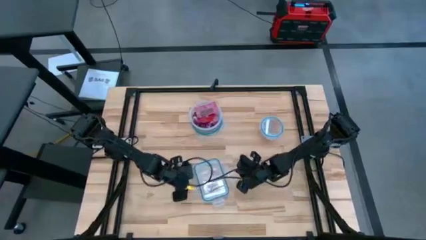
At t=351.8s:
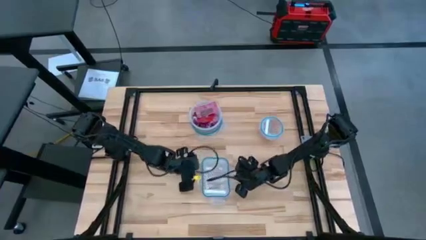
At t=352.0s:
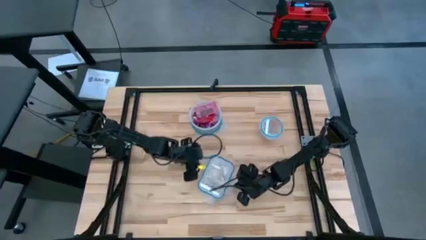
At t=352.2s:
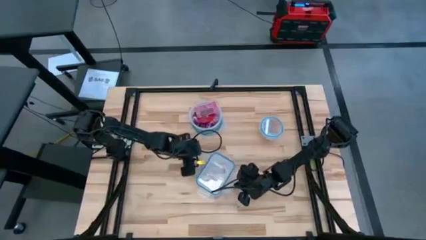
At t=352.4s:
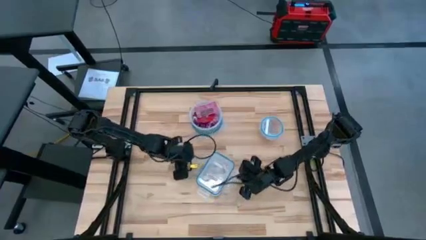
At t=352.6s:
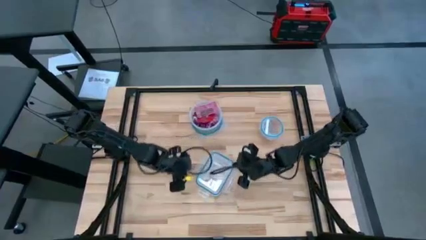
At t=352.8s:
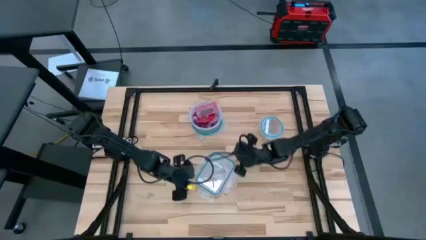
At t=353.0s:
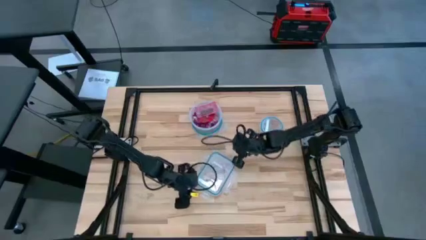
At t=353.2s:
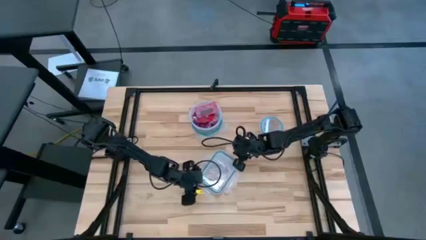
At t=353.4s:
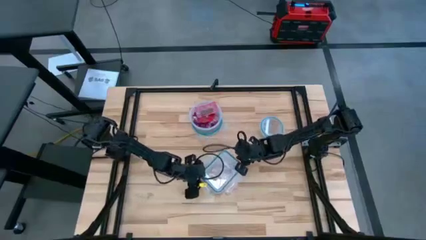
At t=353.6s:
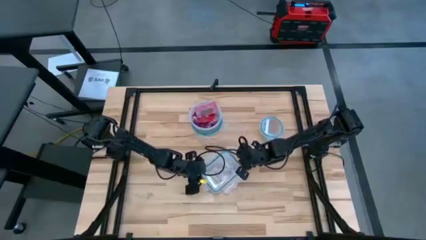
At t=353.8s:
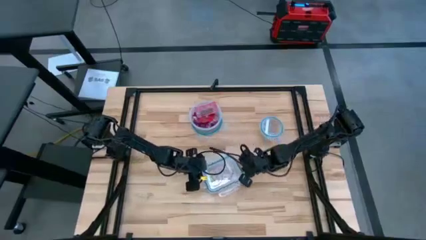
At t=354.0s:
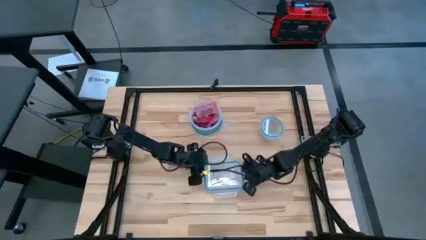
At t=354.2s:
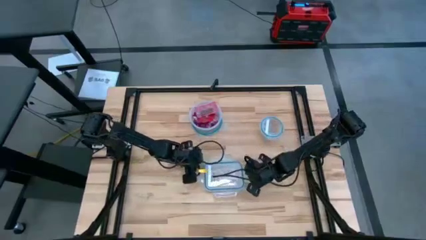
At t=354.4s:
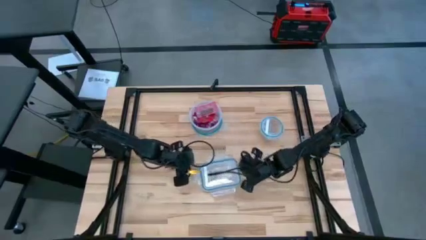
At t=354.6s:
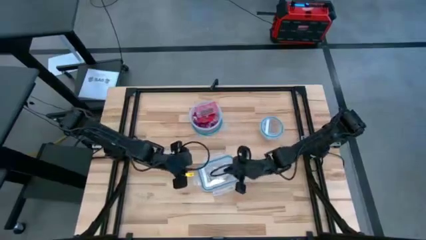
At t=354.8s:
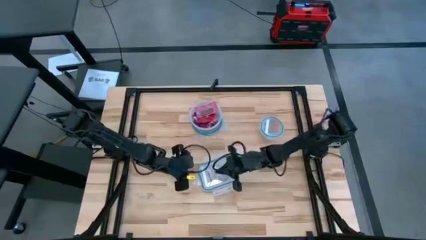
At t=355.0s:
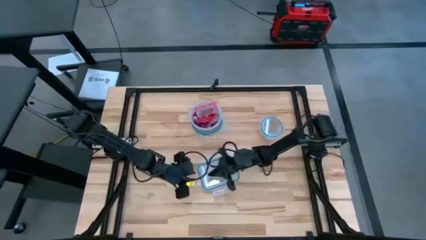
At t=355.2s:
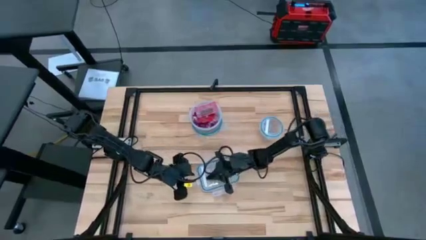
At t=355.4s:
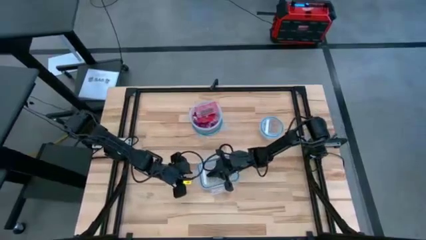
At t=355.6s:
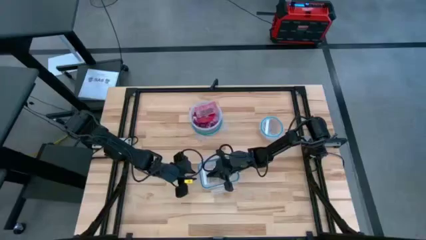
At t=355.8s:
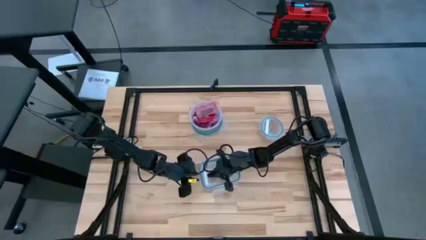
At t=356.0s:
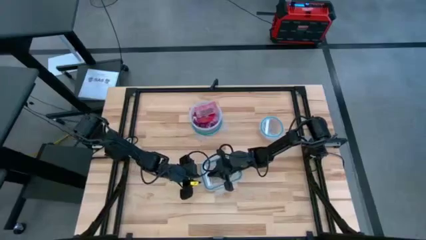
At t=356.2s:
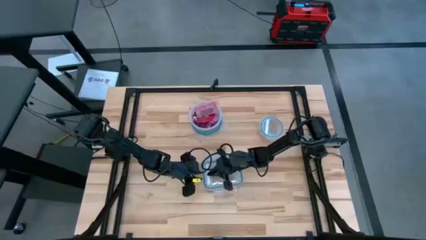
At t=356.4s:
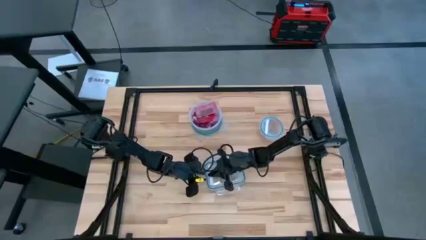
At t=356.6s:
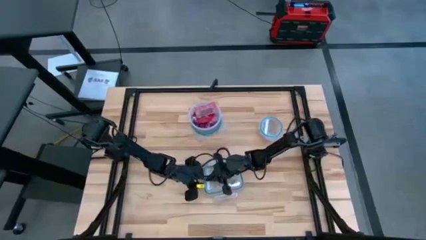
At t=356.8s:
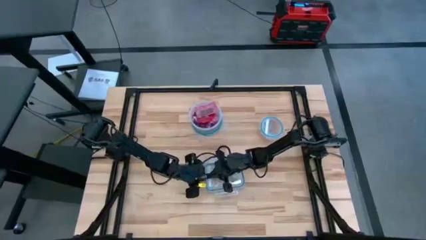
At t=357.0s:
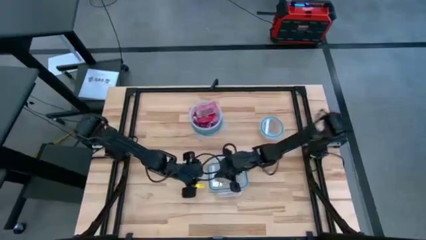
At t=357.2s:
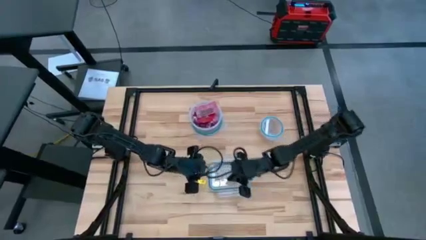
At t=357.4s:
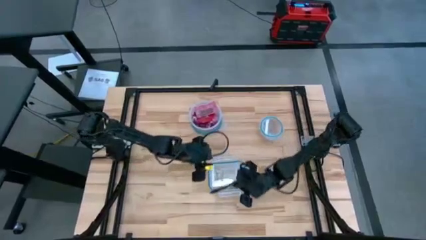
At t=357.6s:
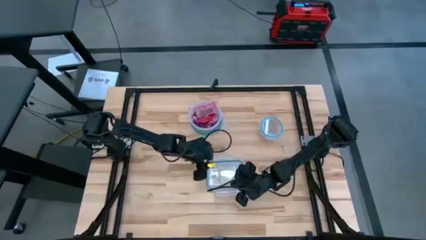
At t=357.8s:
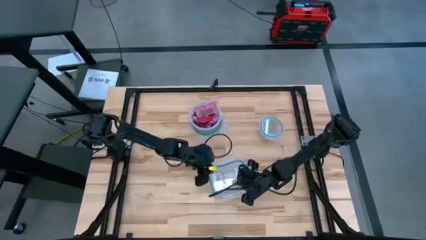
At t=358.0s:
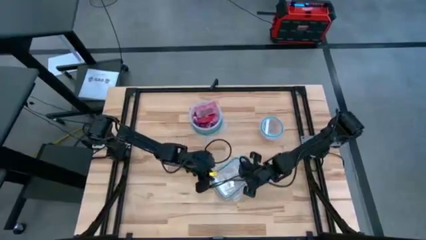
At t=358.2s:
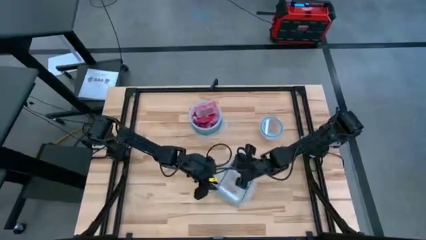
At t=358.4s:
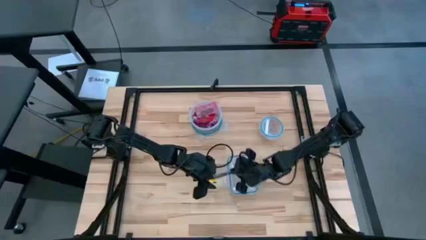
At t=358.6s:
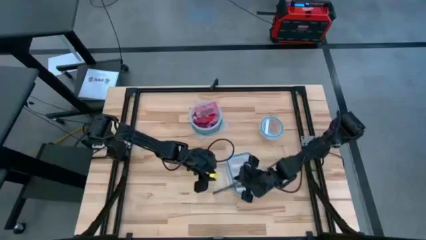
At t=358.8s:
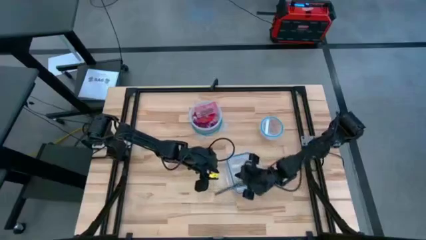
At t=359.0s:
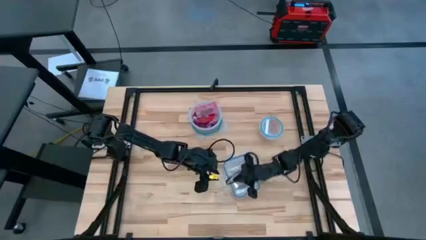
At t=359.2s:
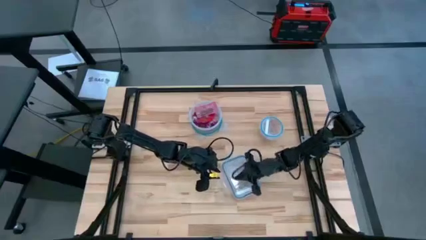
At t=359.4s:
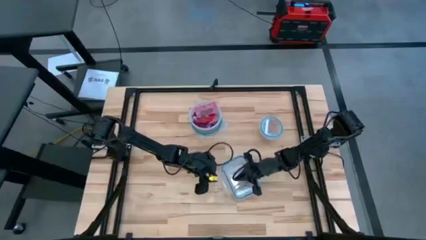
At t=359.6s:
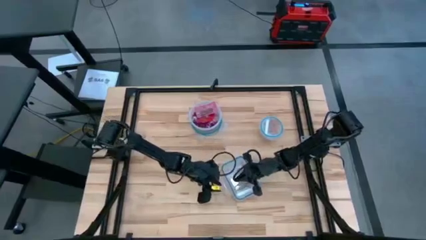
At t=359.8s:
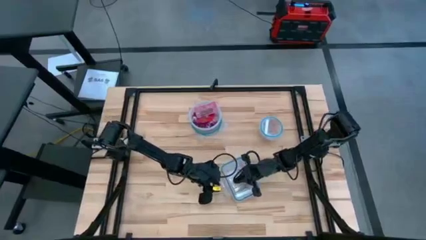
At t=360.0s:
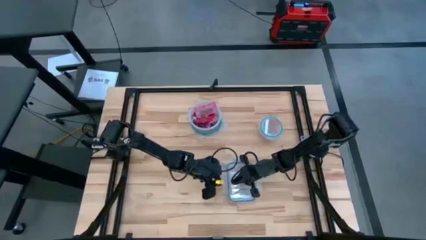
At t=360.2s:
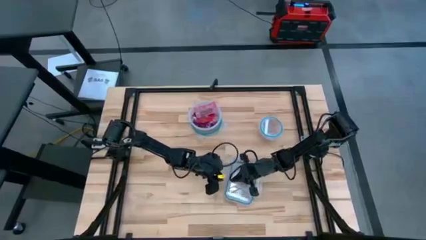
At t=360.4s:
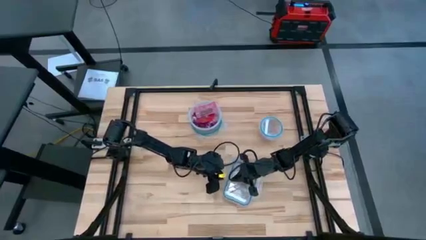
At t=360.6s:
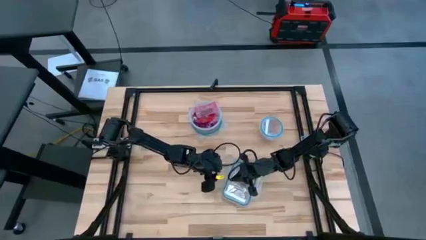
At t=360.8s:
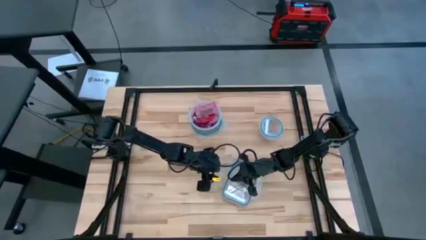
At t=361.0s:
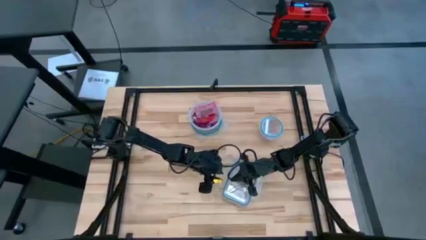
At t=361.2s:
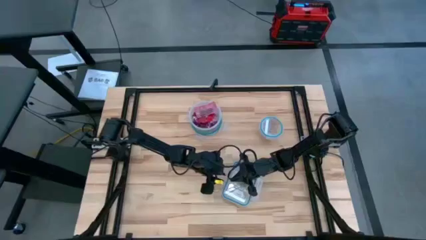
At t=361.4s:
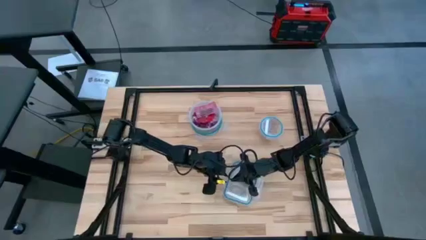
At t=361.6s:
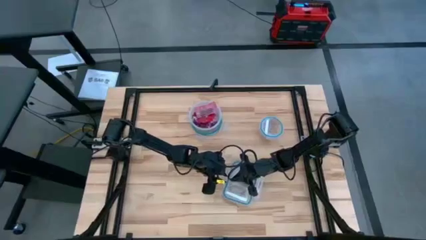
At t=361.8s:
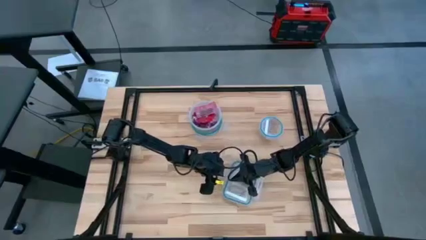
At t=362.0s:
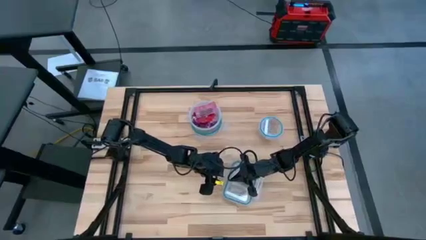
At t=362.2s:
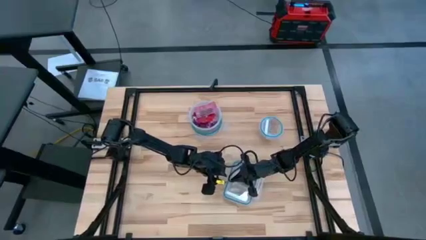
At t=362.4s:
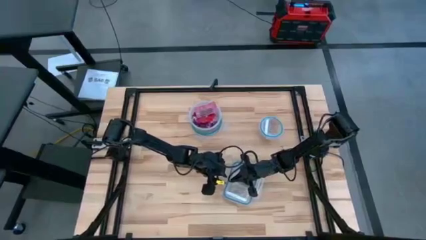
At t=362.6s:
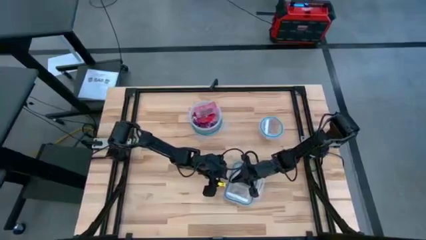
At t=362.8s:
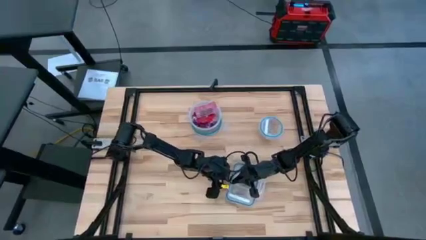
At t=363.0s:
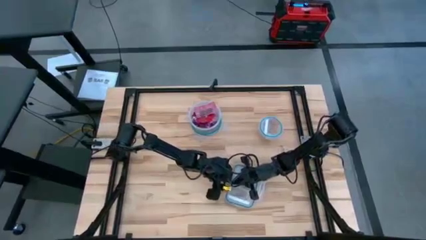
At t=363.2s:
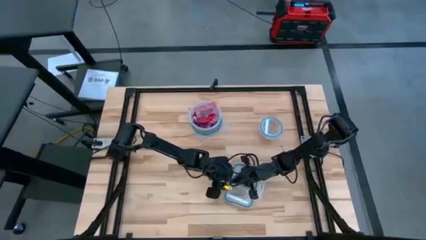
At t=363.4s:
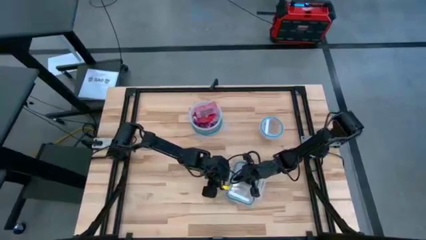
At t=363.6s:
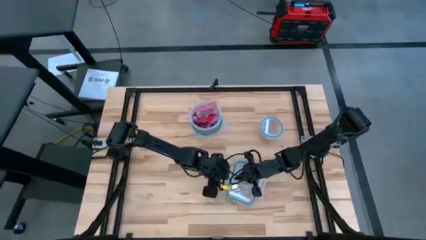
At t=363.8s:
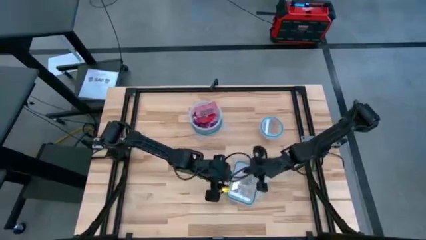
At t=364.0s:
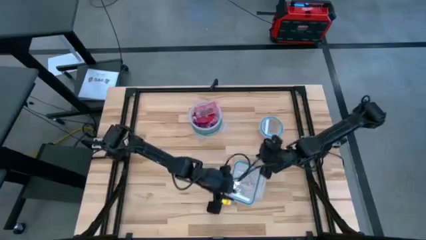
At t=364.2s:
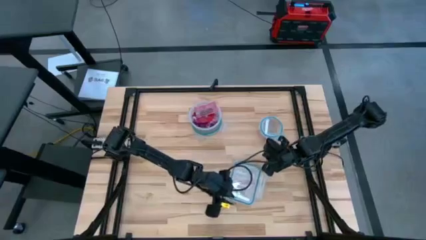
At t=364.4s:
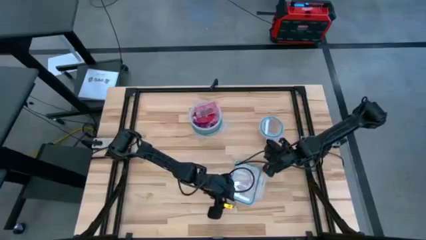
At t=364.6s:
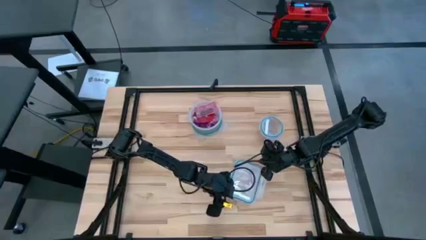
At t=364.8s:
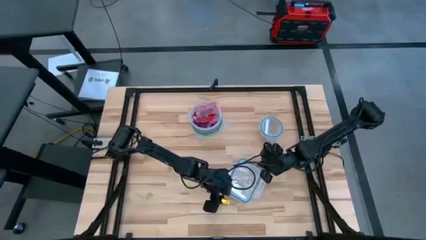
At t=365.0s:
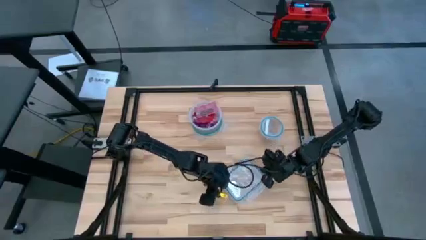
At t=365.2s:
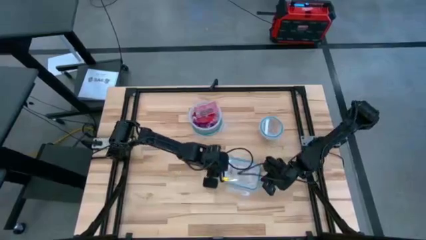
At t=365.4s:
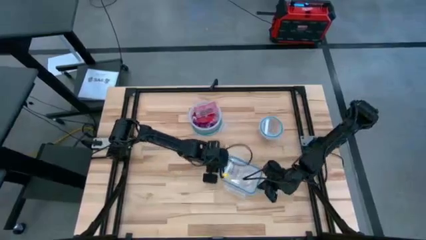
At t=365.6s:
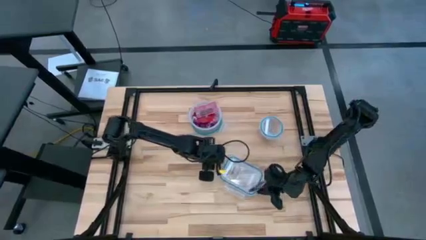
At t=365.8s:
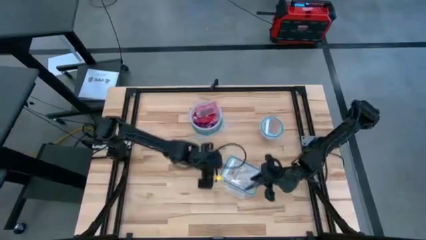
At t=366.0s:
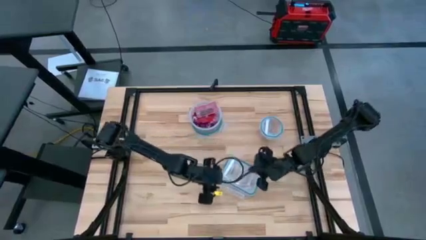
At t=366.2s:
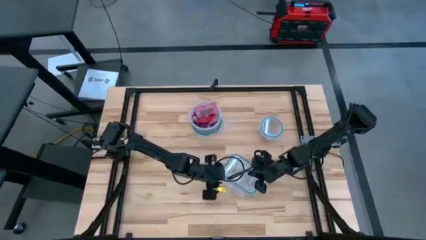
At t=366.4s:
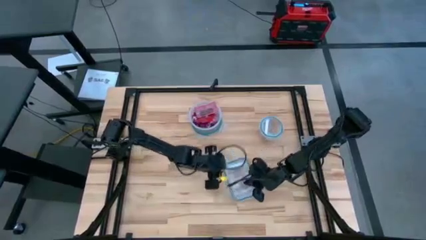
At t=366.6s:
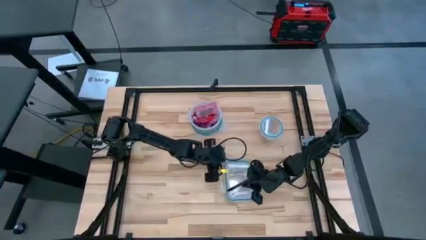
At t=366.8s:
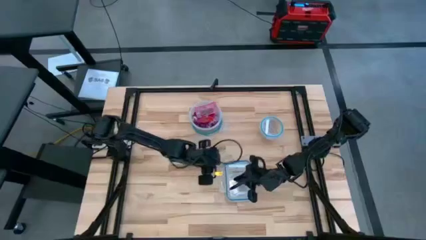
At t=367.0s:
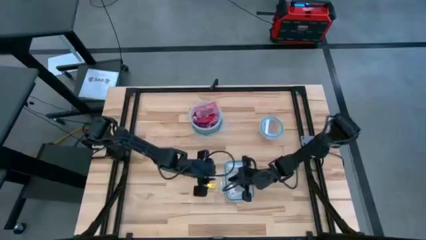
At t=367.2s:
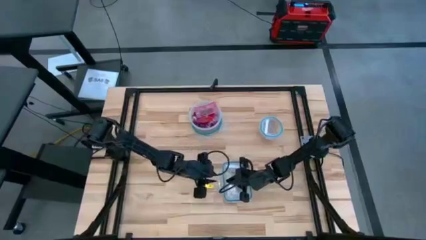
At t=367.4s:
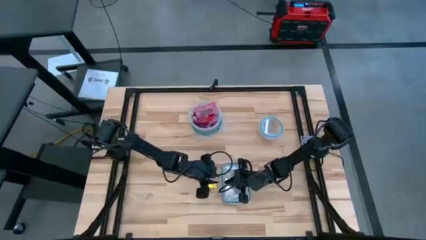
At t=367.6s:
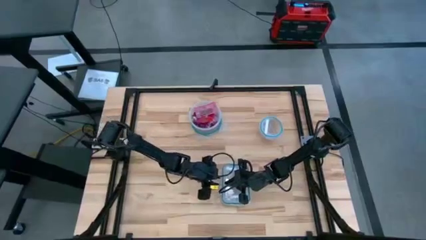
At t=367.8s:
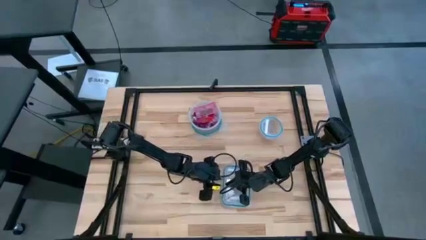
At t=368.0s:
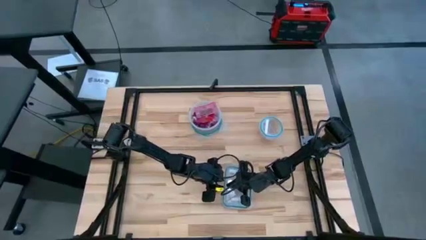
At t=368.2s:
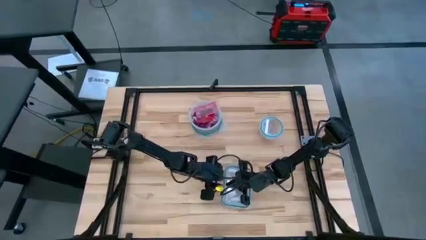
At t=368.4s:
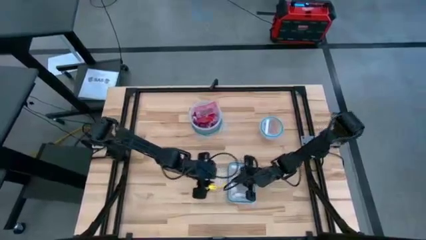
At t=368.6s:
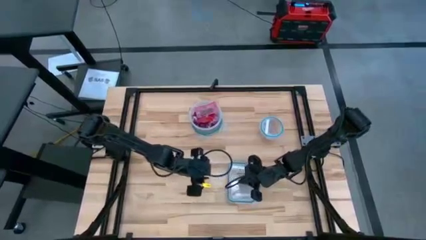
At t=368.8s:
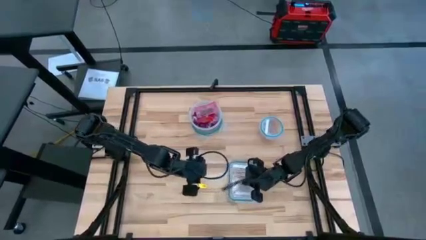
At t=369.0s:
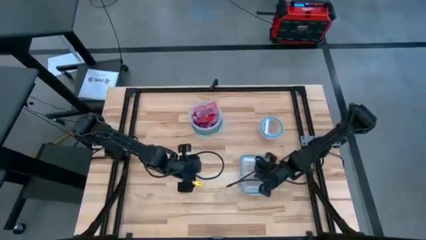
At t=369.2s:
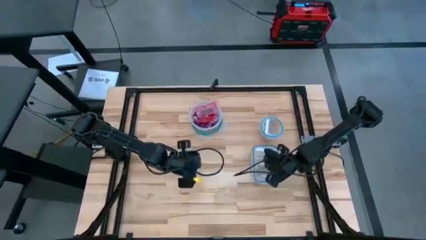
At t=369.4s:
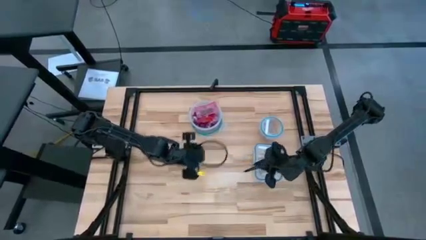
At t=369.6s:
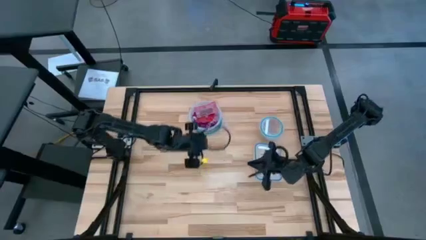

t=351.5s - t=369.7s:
Task: Sort candy
Close the rectangular transparent bin
